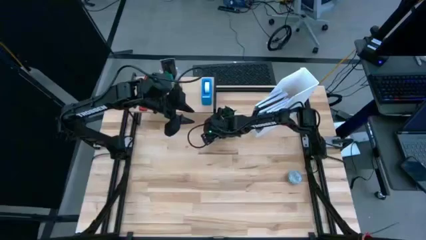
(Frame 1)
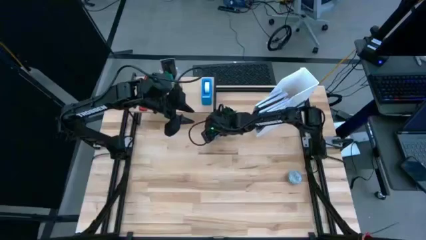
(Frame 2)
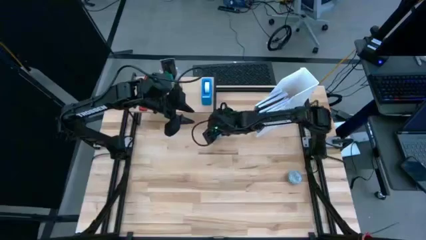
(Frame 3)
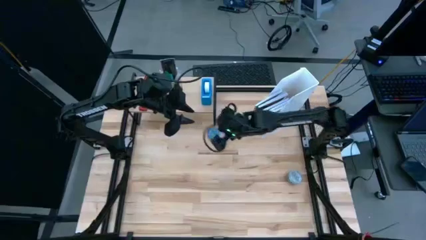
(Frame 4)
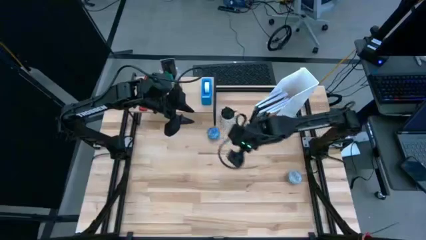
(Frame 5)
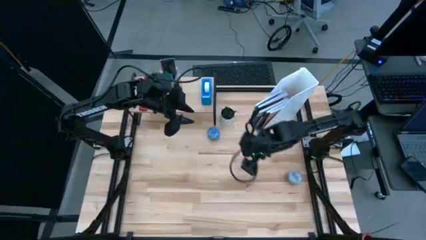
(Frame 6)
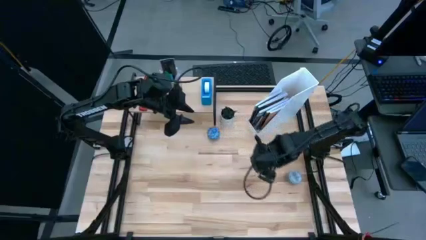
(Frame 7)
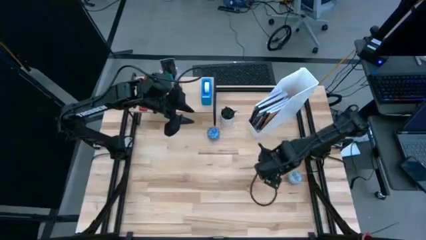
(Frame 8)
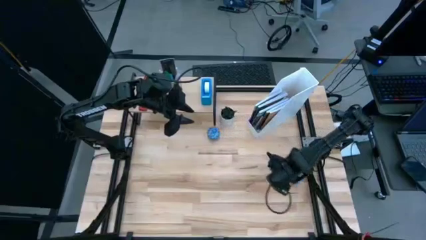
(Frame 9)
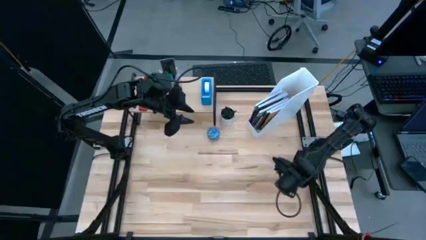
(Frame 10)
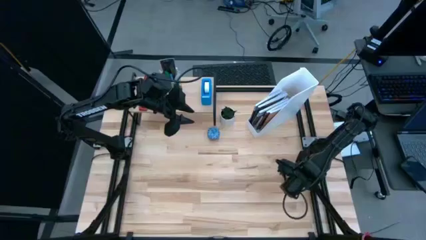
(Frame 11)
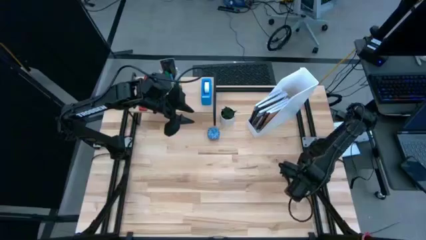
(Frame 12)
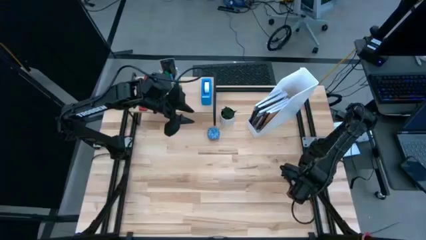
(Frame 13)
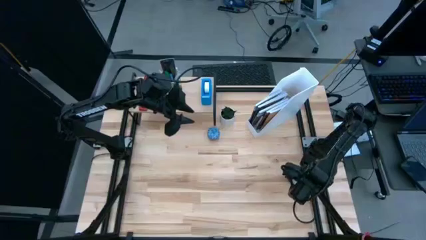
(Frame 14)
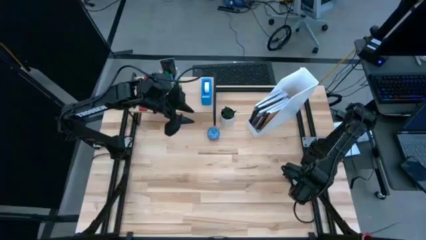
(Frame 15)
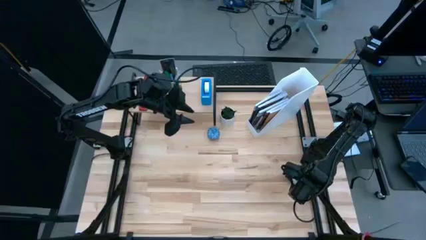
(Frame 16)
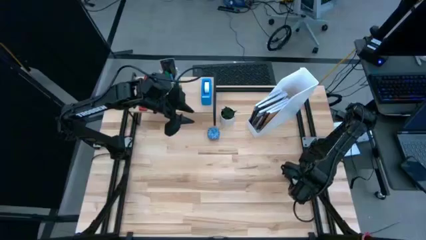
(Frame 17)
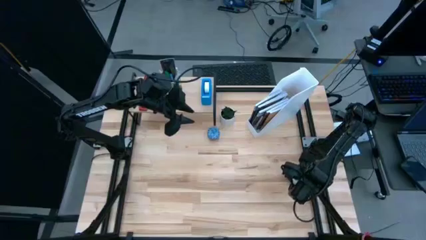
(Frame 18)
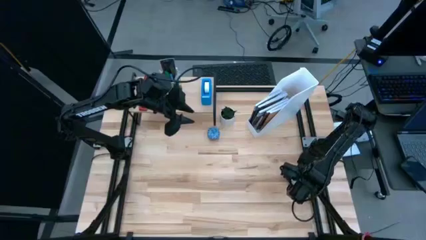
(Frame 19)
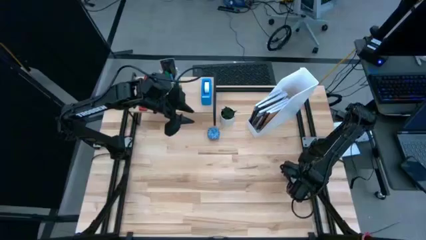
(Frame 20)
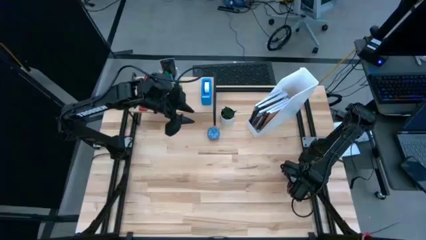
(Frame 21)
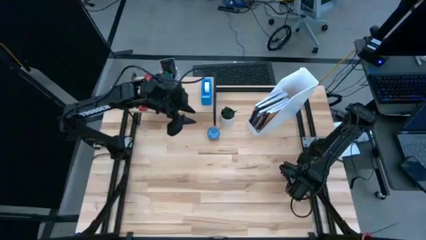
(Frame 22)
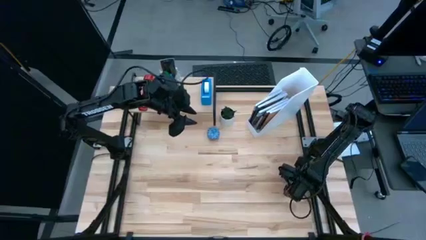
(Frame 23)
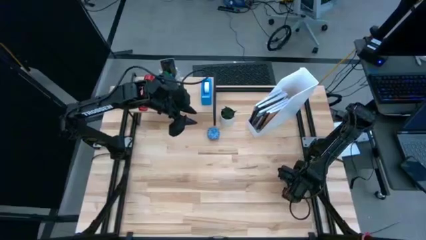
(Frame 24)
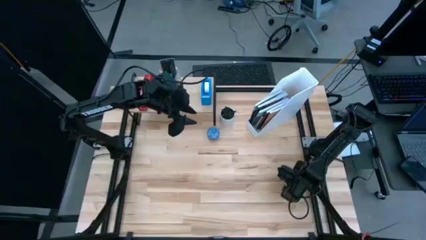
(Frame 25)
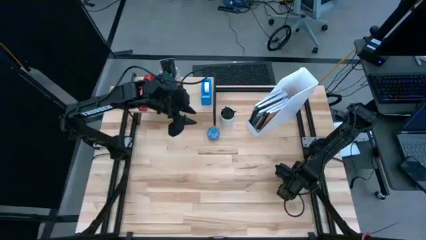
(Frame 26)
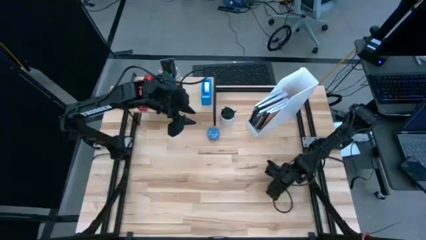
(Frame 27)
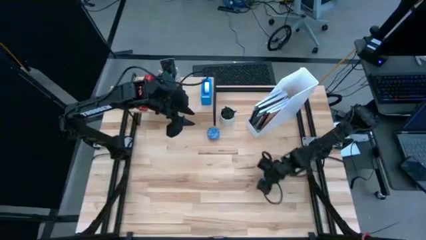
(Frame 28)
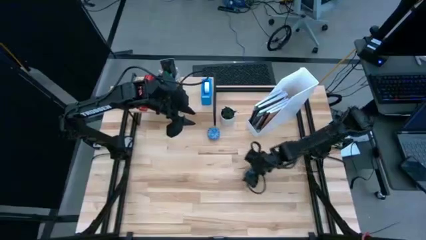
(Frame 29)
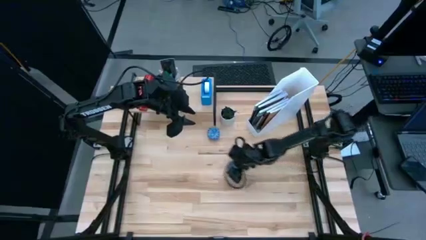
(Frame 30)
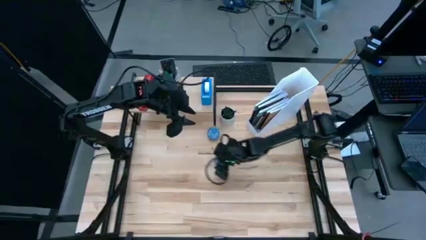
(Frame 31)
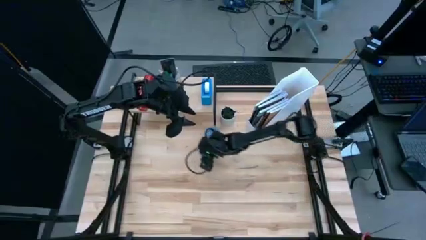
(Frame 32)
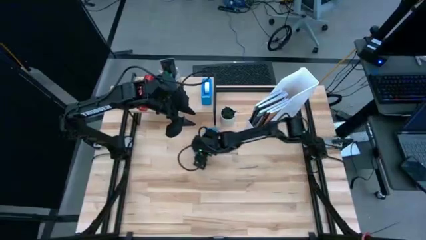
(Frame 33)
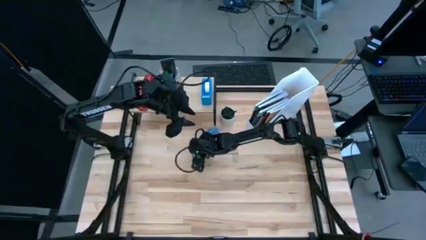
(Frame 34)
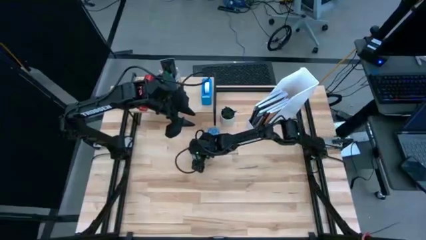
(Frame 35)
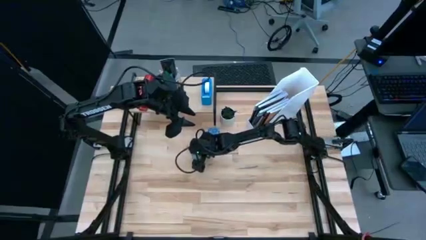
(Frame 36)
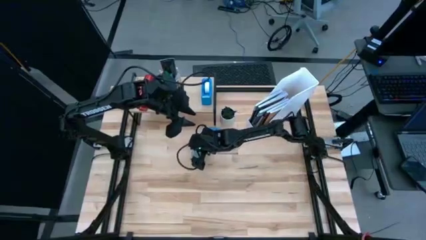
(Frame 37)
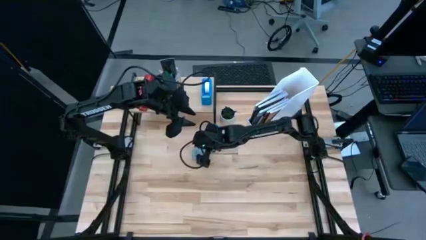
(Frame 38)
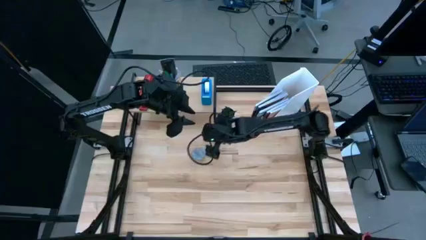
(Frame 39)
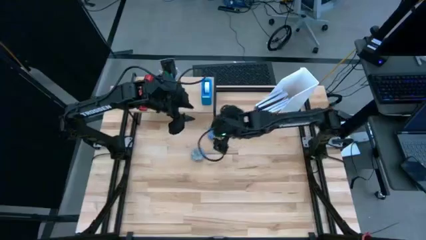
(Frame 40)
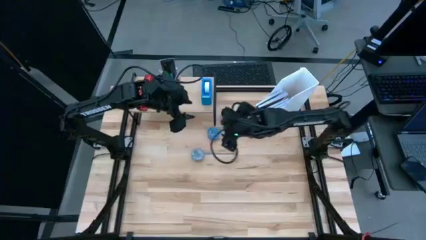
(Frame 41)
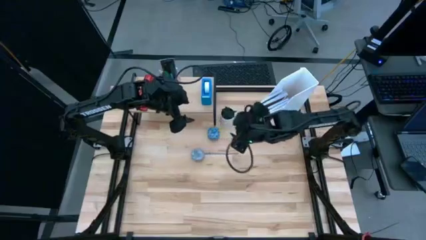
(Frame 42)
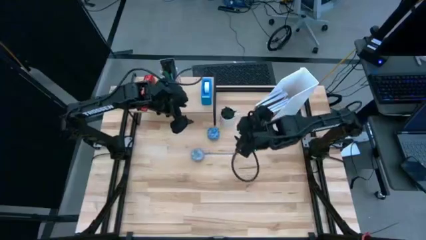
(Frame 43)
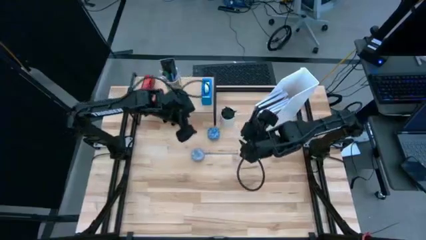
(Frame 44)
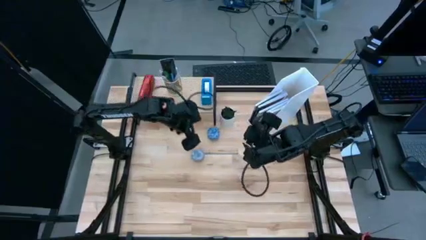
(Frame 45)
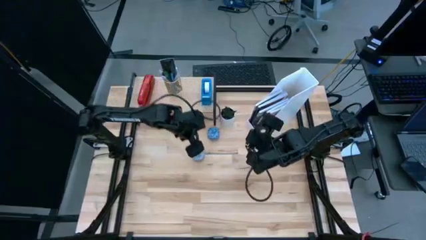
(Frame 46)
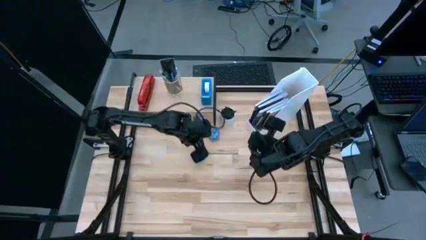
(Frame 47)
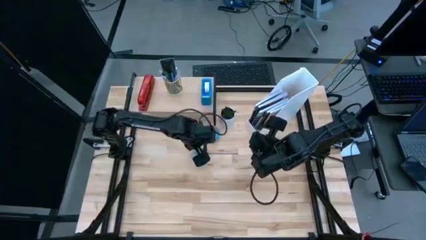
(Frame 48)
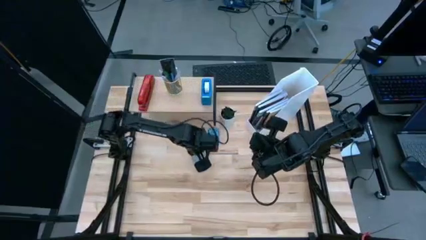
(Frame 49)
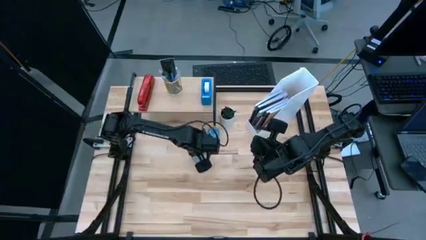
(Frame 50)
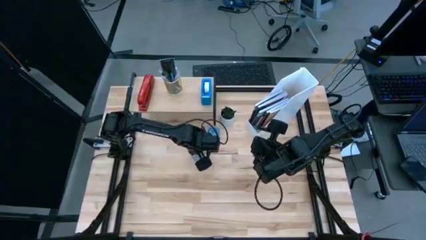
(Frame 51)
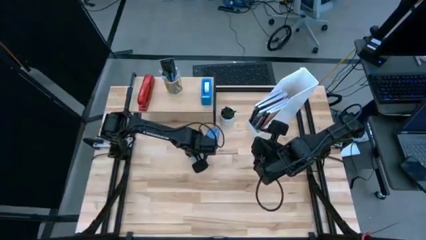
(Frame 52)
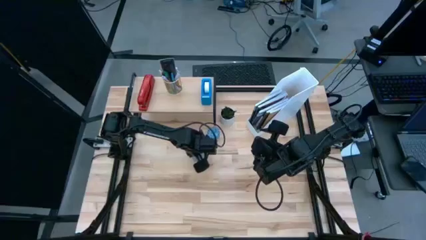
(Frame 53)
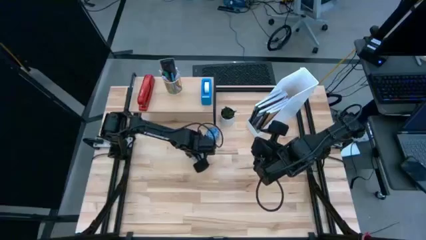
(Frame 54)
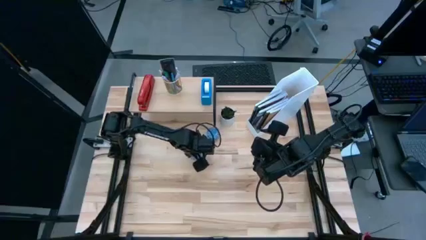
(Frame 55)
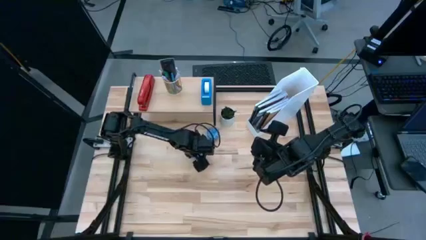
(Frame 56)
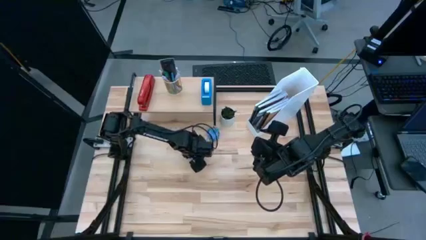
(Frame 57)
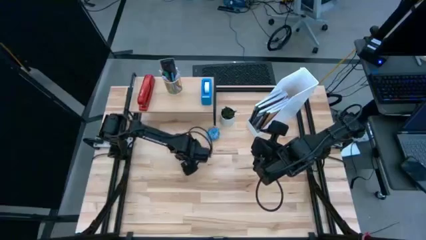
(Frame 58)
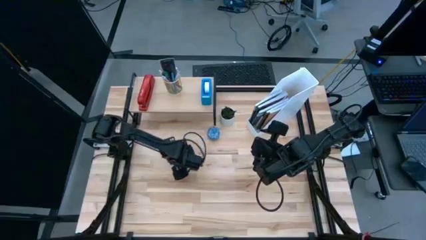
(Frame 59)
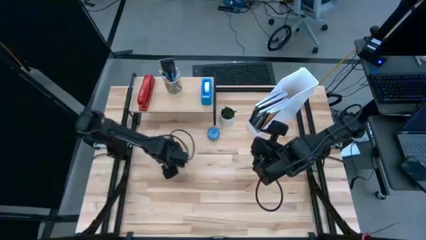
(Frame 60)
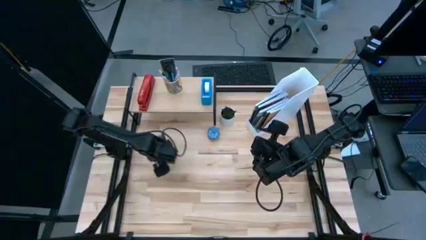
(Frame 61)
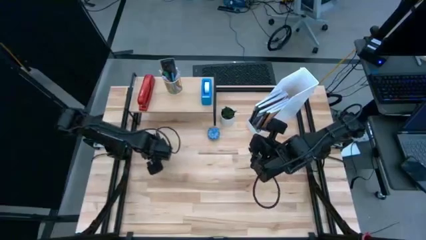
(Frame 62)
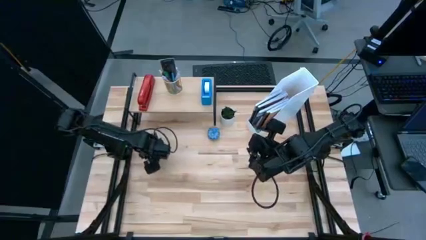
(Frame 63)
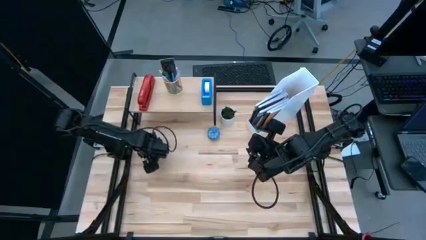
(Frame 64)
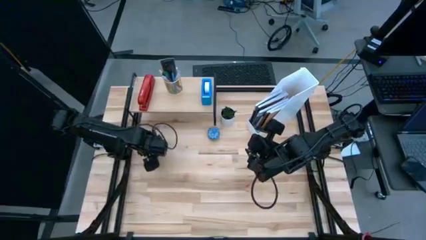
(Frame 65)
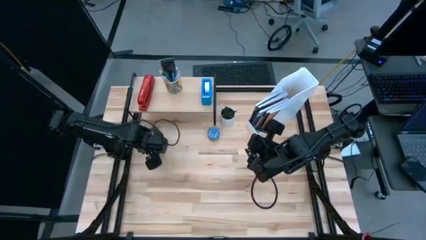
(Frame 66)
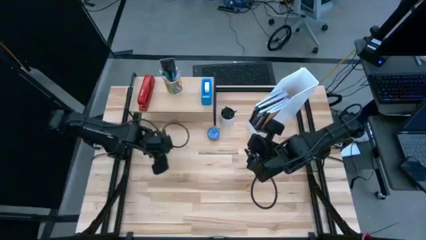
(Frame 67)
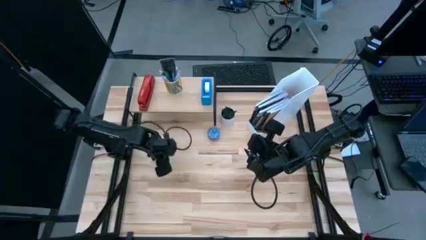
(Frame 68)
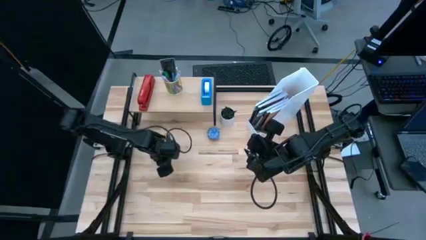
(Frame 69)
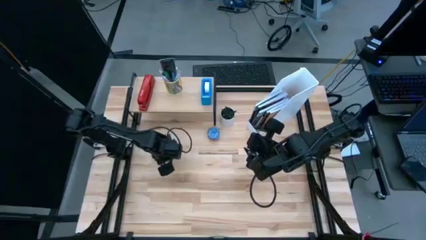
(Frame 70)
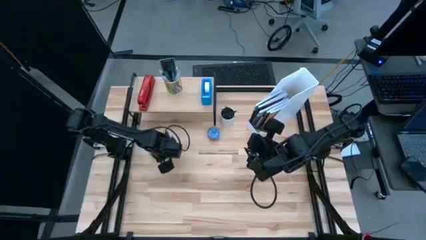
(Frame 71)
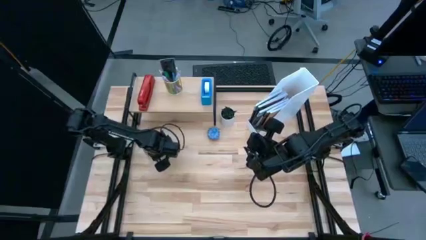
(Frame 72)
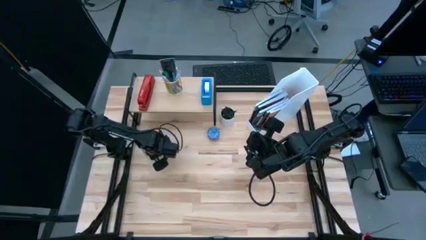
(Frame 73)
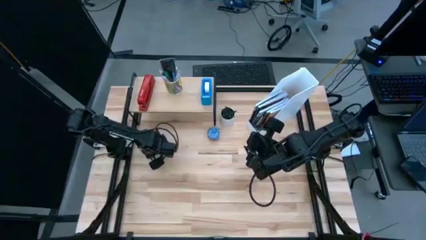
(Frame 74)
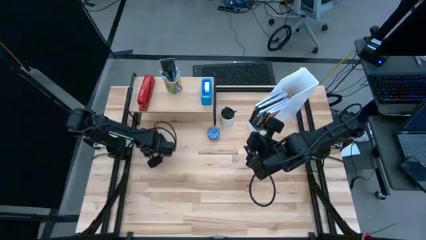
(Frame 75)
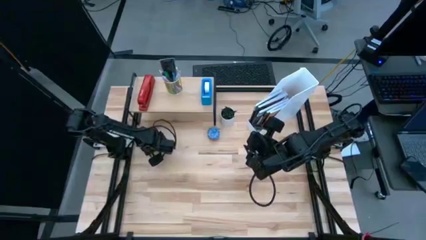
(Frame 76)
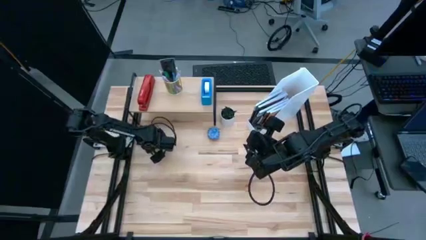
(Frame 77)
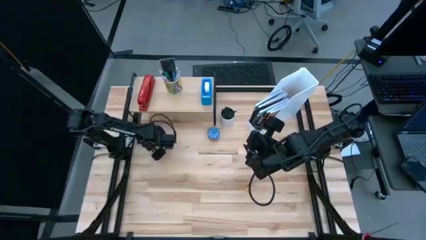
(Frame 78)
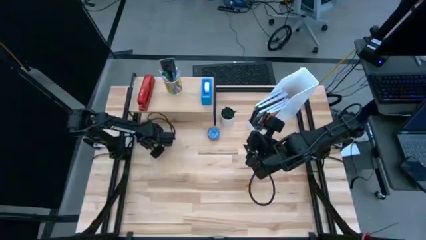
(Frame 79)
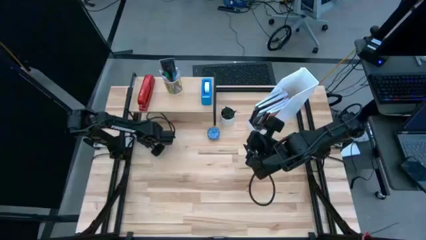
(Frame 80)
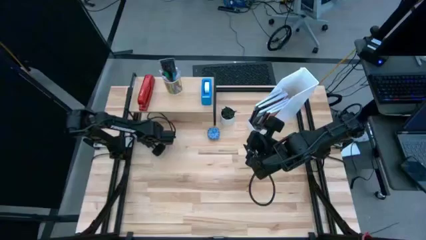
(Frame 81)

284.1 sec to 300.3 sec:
Task: Stock shelves
Put the white scented candle to the bottom left of the shelf

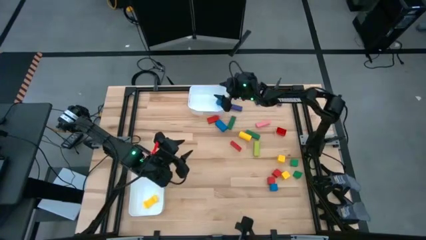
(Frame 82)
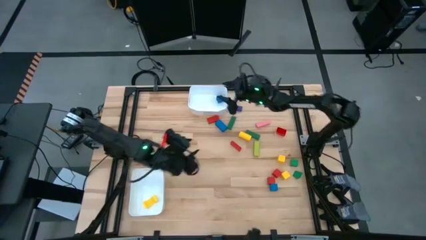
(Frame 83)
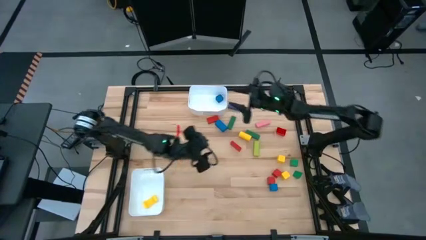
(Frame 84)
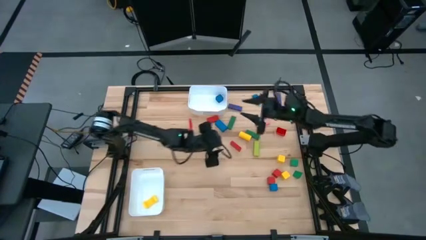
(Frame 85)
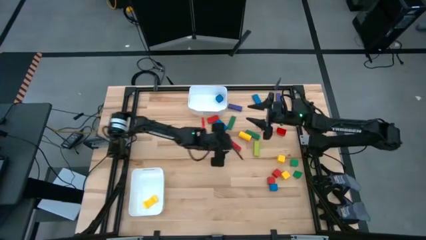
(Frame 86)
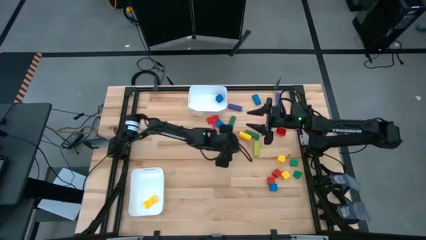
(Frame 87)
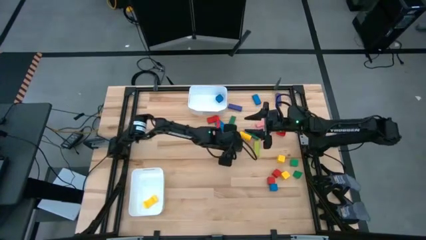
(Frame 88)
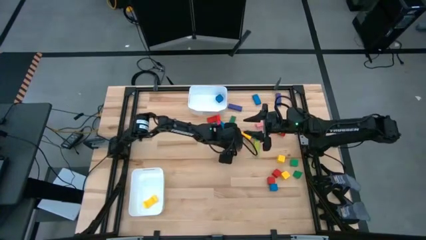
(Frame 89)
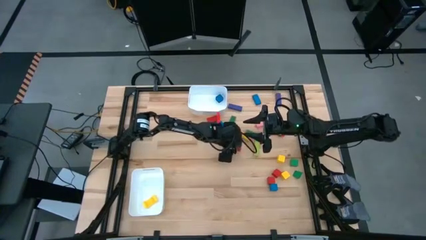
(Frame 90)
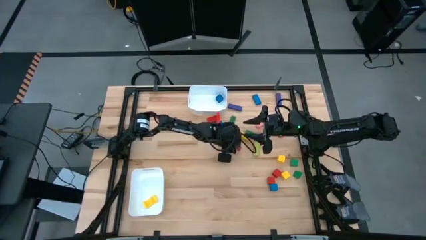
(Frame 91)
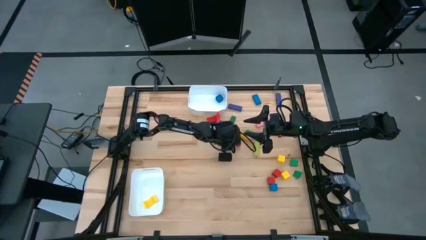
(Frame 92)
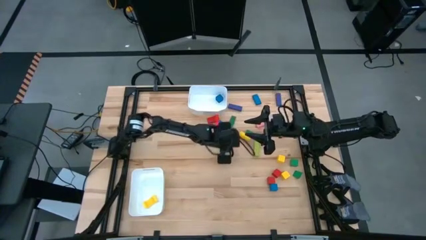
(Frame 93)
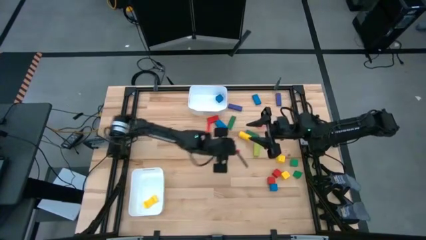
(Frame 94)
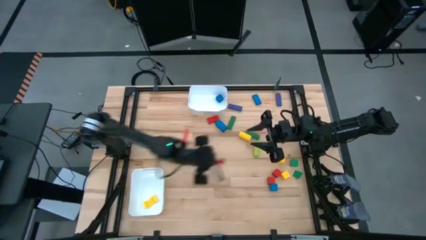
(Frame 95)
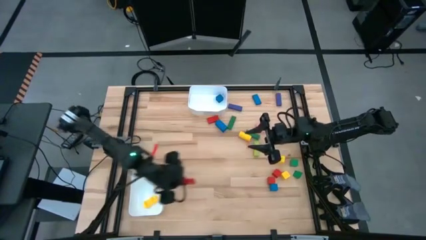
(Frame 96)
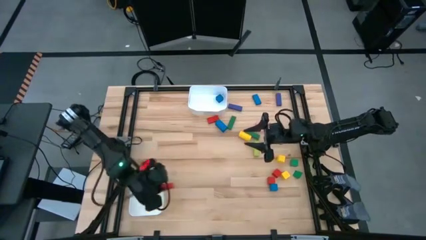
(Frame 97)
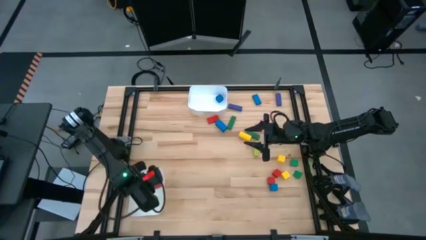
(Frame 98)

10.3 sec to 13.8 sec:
Task: Sort blocks by size
Put the red rectangular block into the bottom white bin
